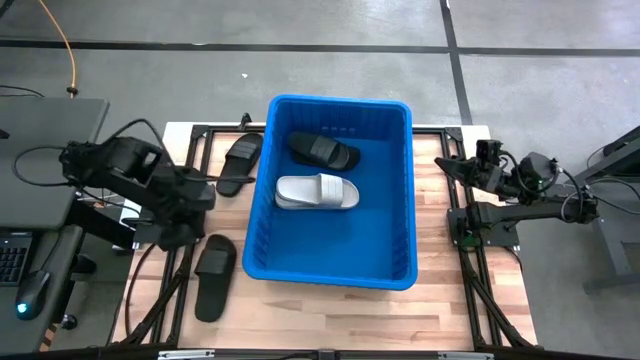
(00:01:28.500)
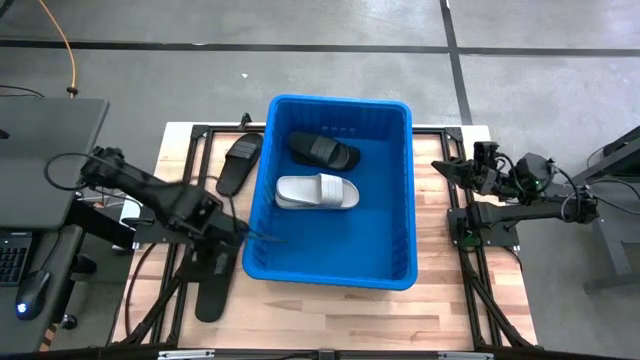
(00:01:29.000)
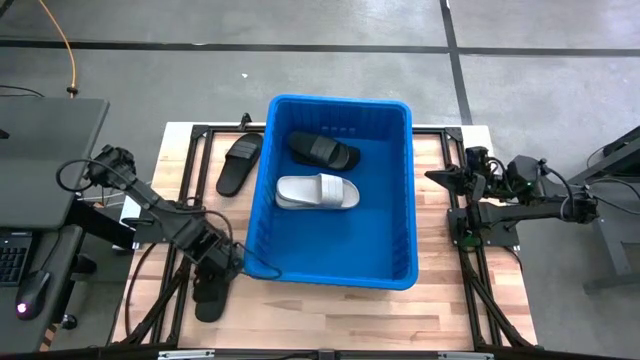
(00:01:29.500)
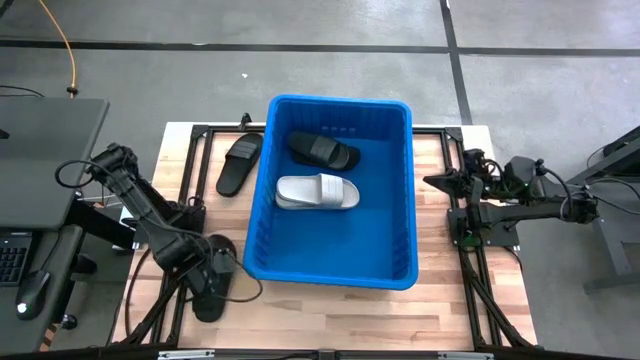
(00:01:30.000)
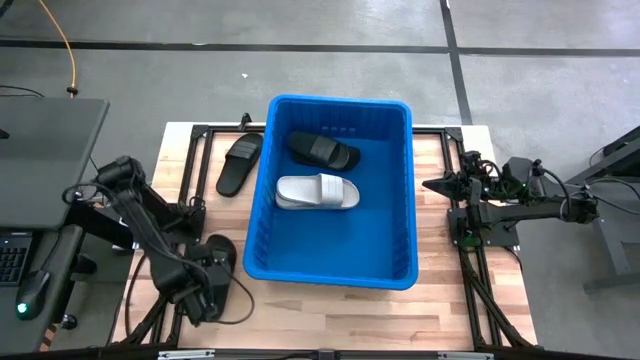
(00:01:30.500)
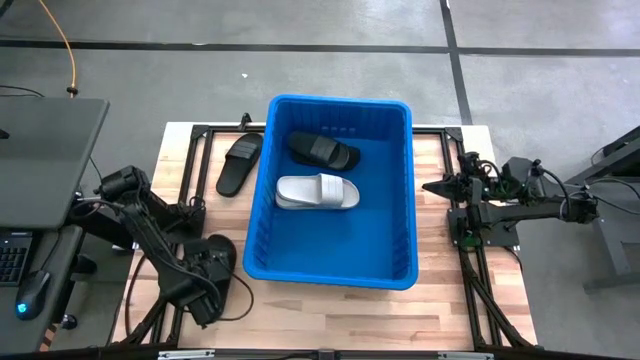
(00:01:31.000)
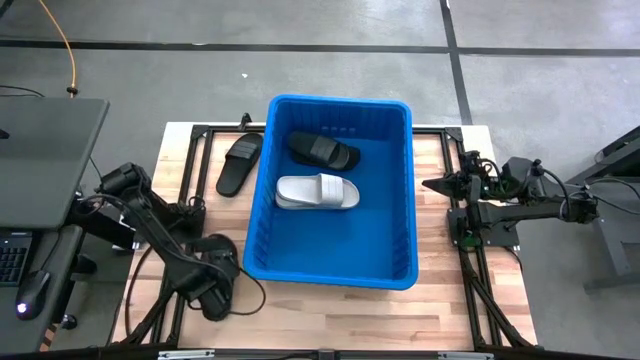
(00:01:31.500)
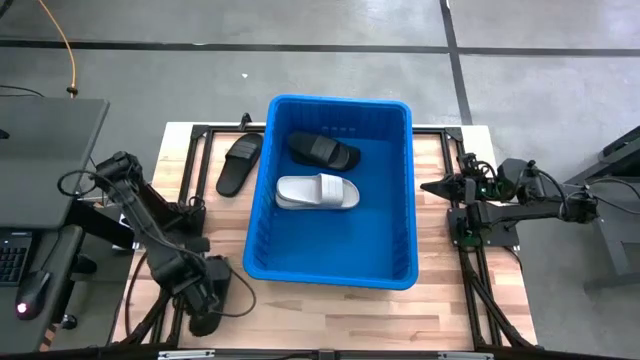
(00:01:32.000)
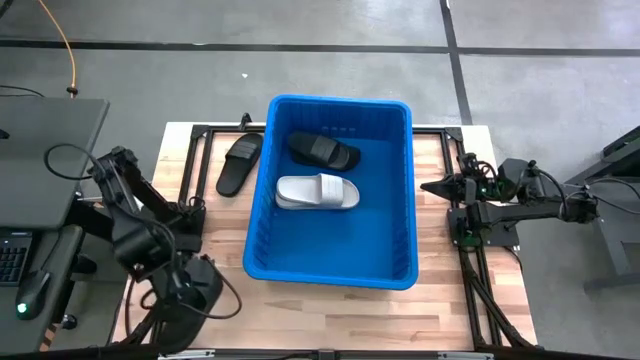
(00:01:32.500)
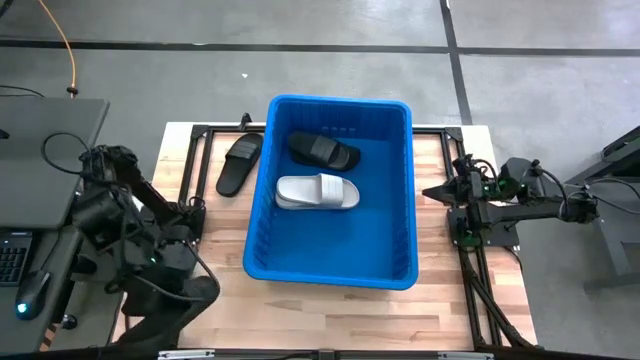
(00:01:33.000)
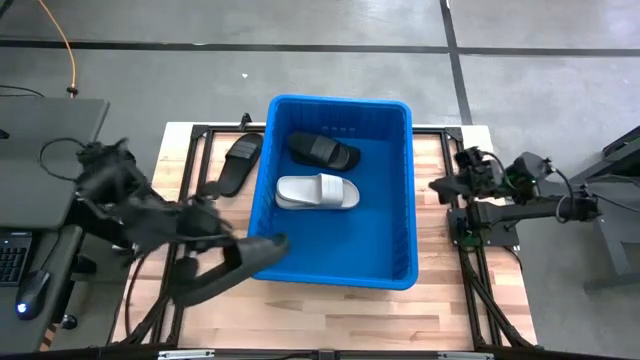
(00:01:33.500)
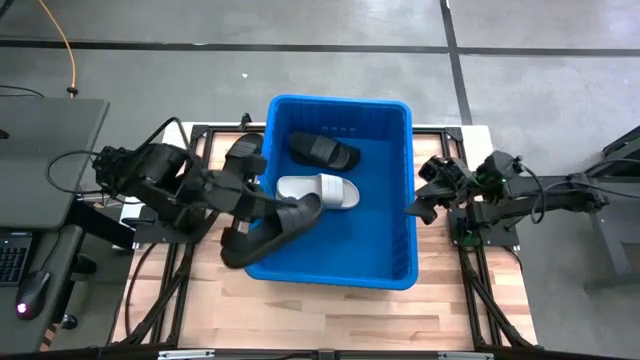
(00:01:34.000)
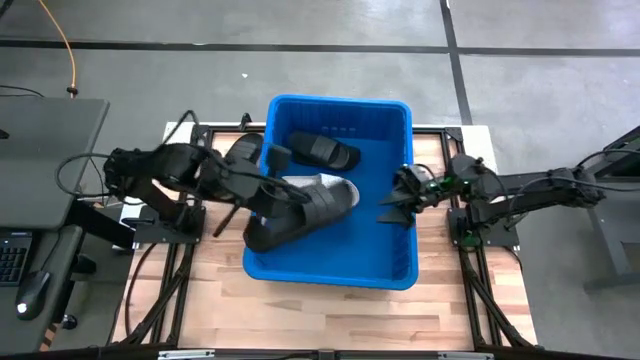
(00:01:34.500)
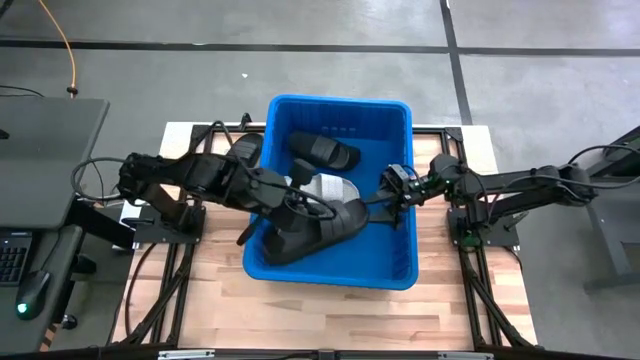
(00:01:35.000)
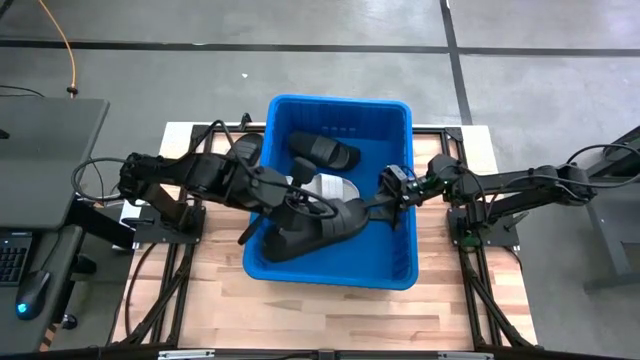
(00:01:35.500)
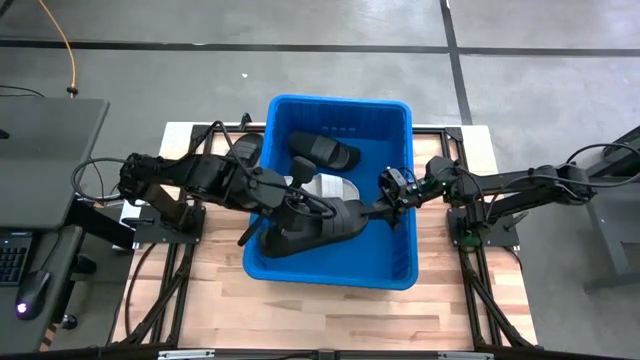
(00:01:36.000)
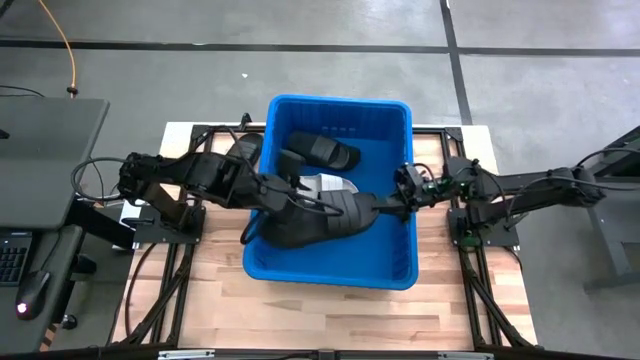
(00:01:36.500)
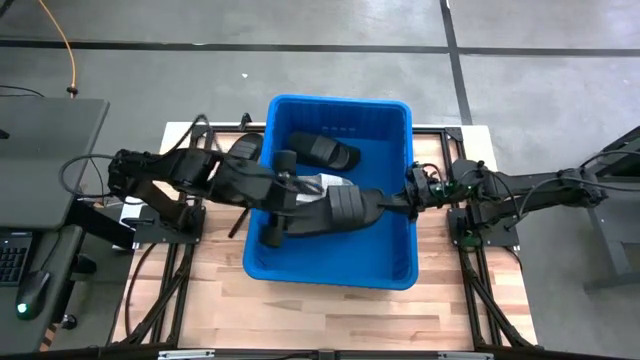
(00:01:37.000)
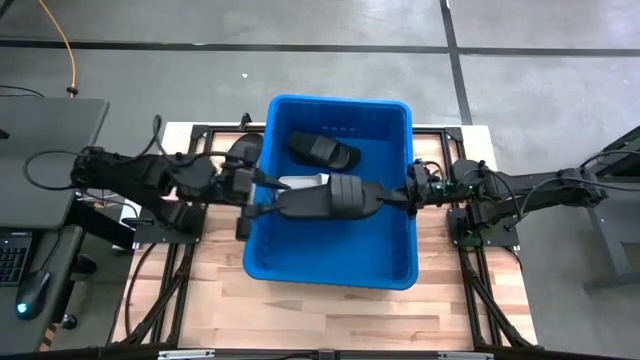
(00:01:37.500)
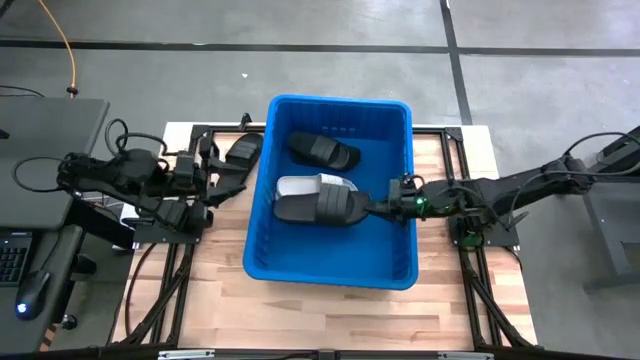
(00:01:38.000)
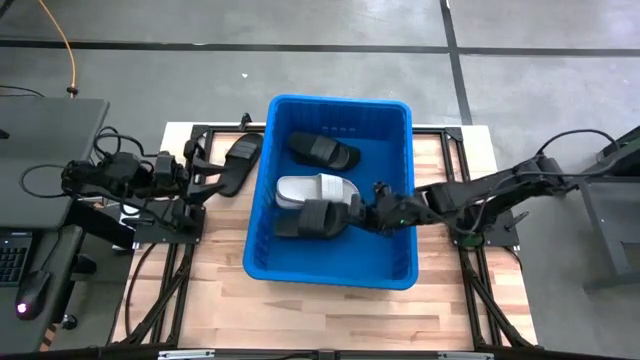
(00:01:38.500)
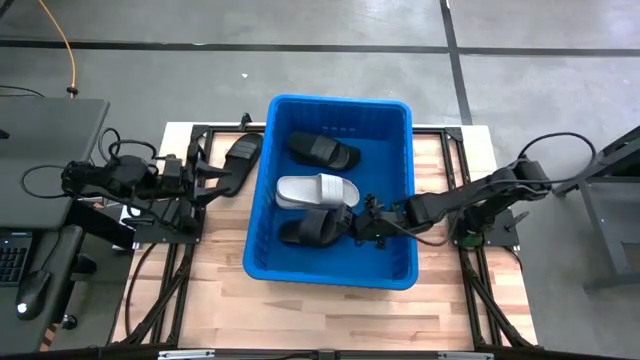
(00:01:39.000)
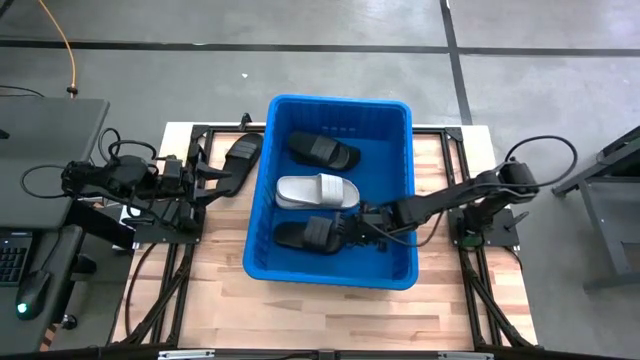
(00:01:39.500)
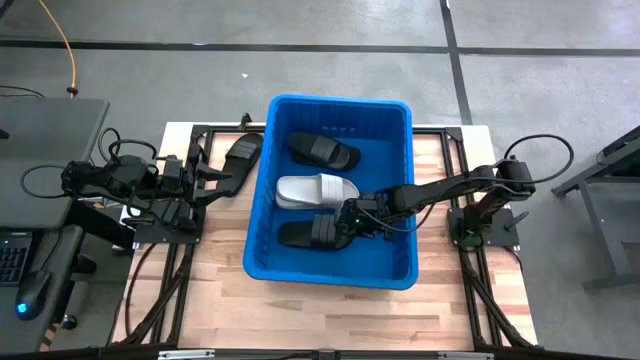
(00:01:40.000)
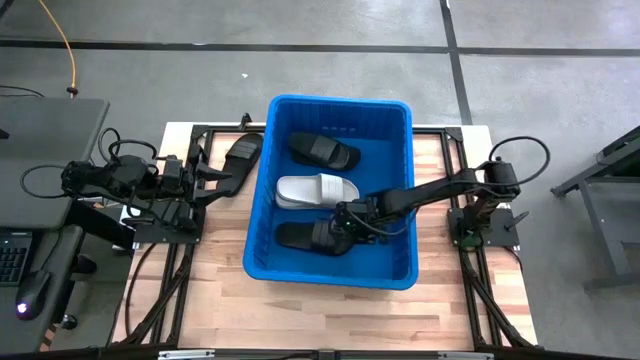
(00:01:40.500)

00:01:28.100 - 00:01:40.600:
Task: Pick and place slides into bin
Put the black slide into the blue container

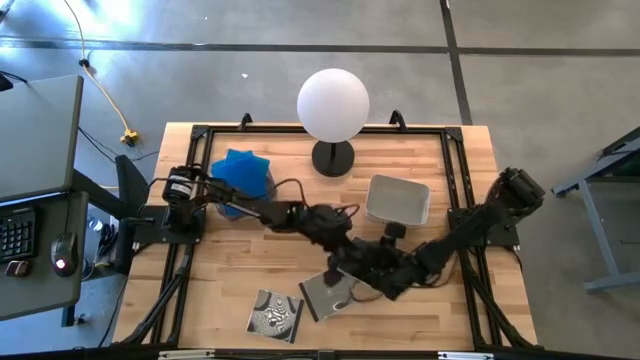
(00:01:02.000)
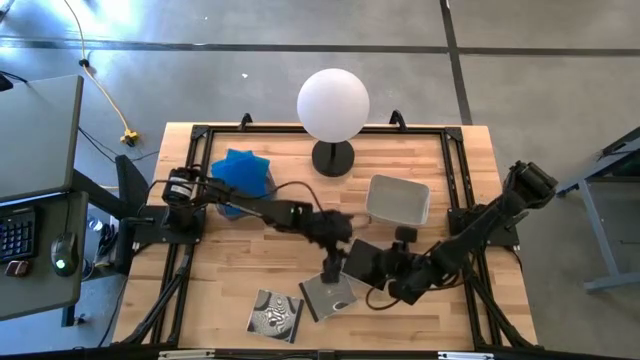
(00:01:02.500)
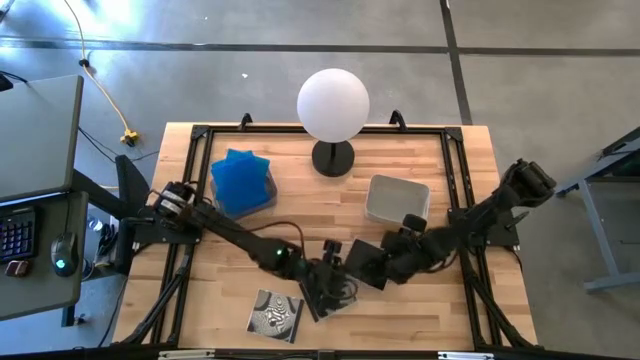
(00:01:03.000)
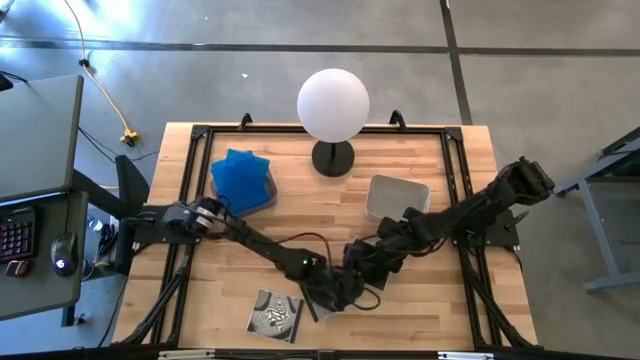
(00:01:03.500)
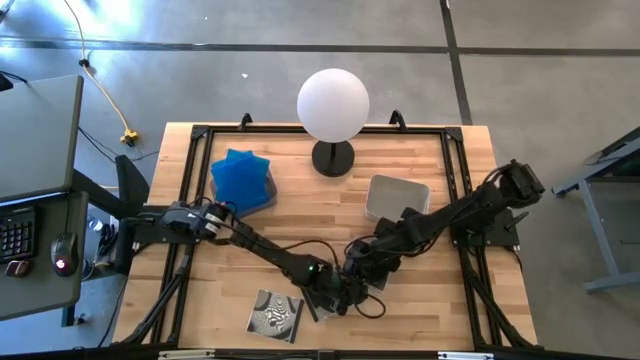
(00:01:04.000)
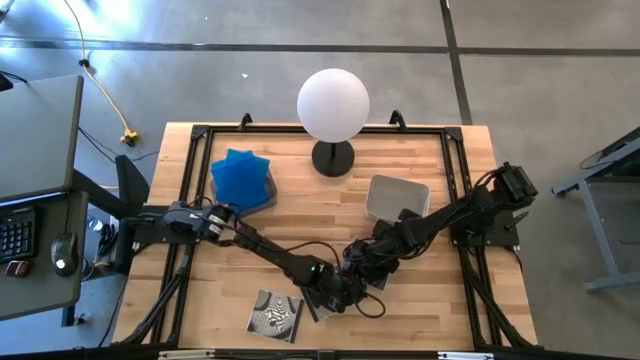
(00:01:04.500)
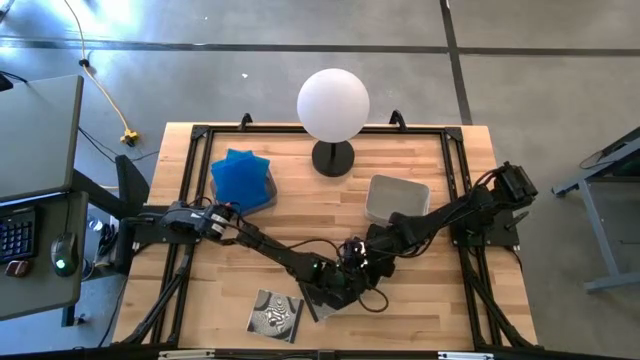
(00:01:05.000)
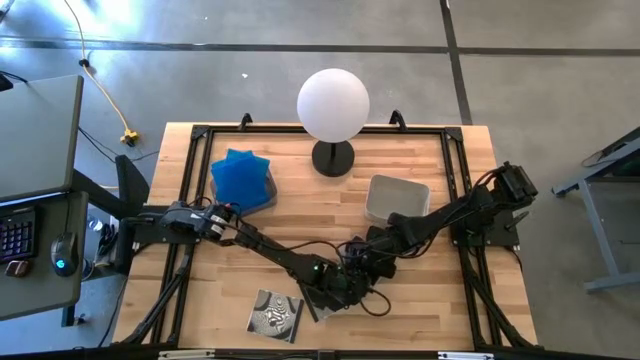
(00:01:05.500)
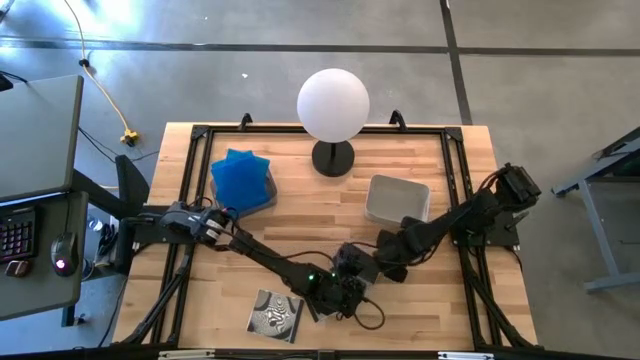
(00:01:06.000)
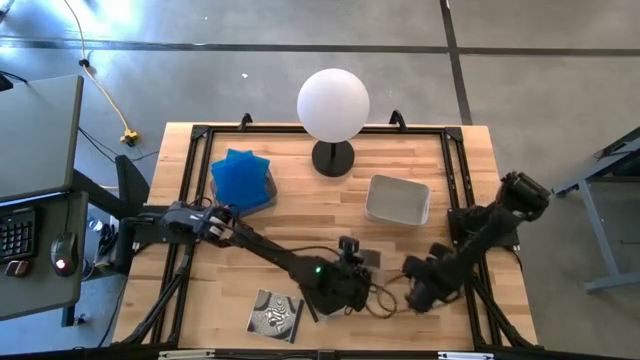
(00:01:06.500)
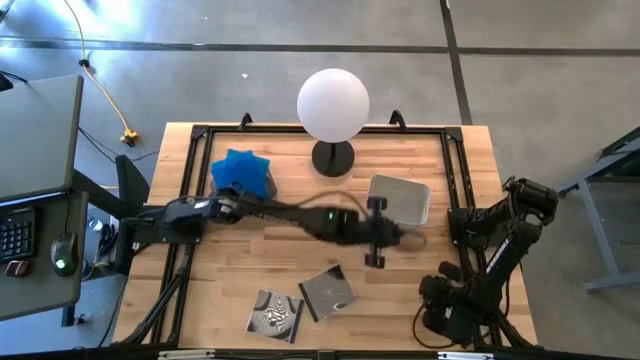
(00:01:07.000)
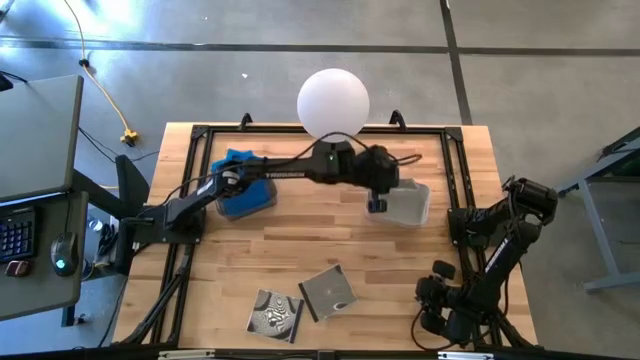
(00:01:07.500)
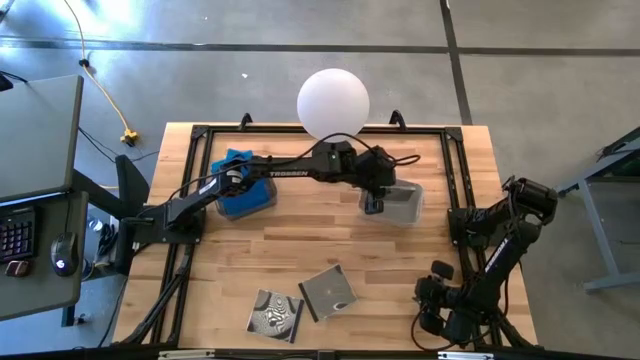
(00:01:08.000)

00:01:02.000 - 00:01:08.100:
Task: Pick & place jewel cases by type
Put the top black cd case into the gray bin

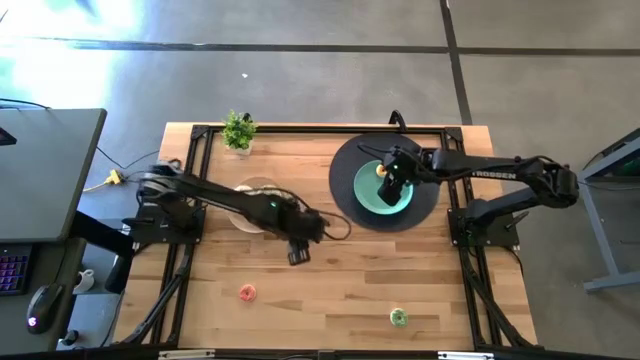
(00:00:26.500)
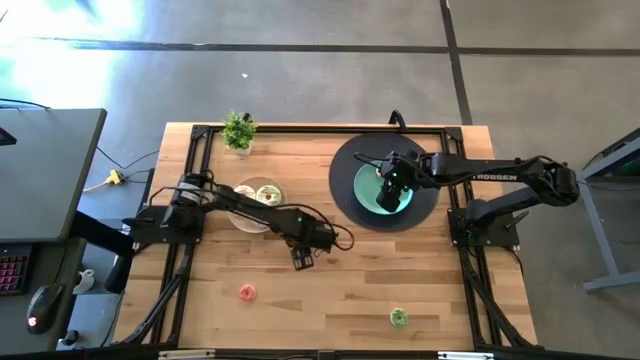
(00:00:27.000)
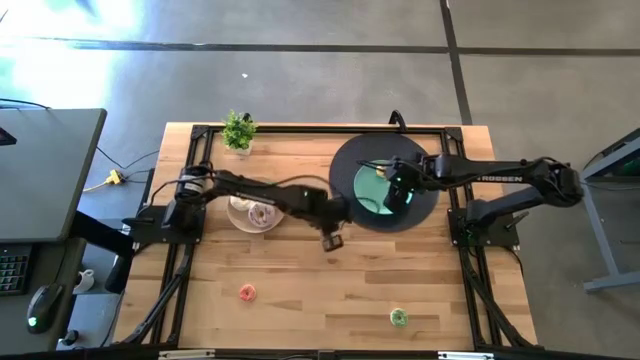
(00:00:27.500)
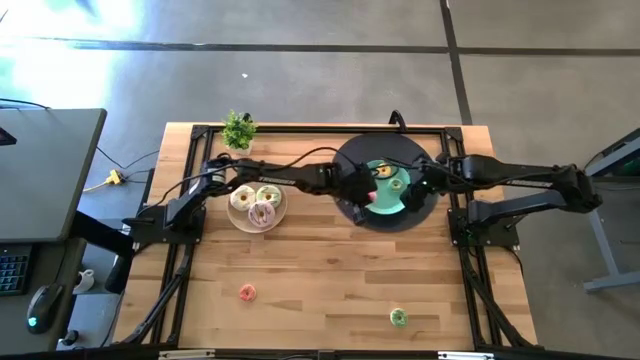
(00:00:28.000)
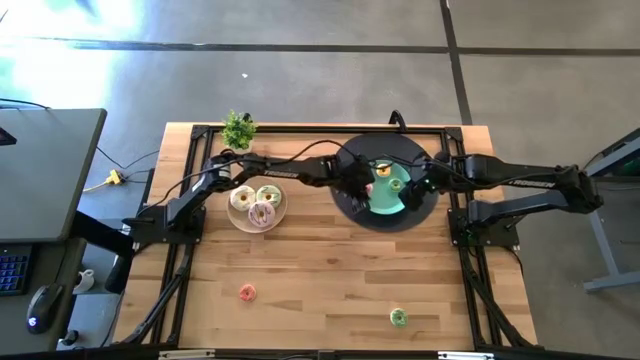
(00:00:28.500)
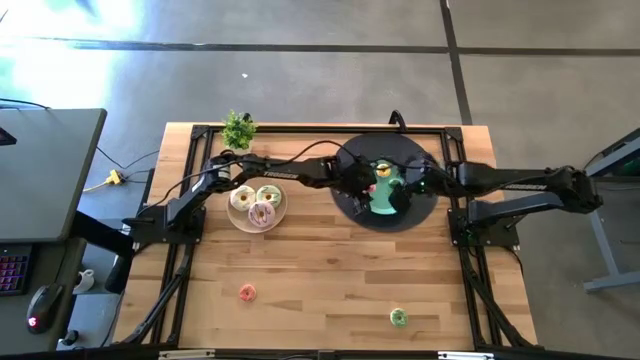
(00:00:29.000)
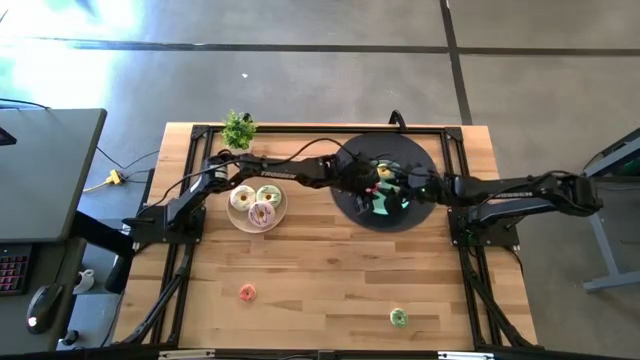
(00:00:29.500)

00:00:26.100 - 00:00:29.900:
Task: Pick & Place donuts
Put the top small pink donut on the blue plate
